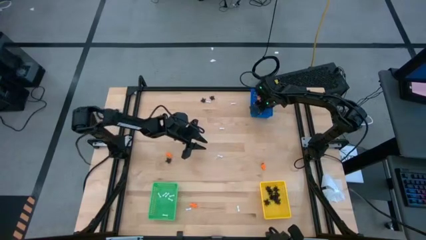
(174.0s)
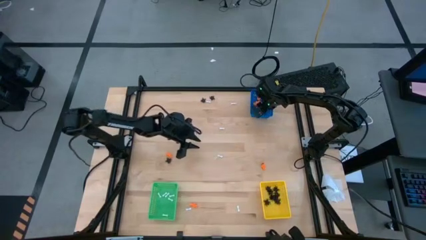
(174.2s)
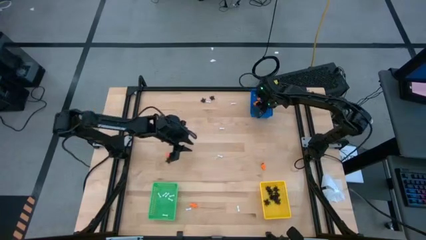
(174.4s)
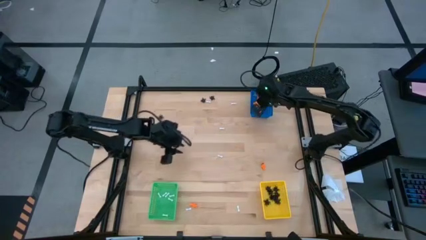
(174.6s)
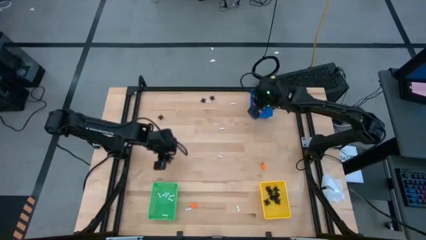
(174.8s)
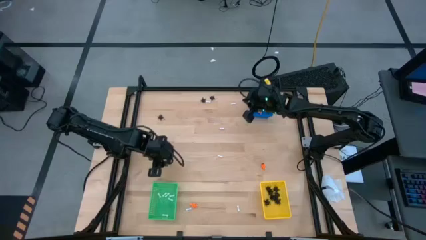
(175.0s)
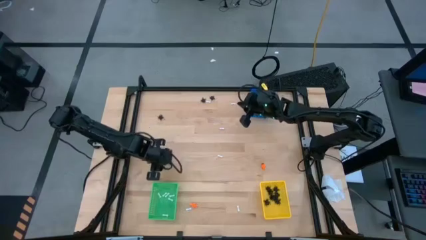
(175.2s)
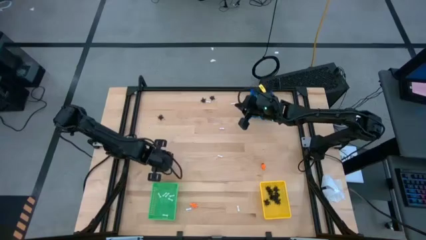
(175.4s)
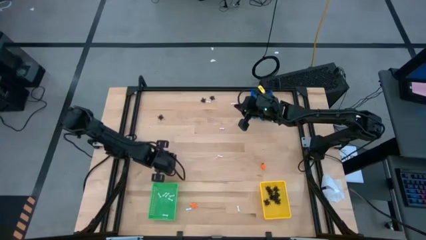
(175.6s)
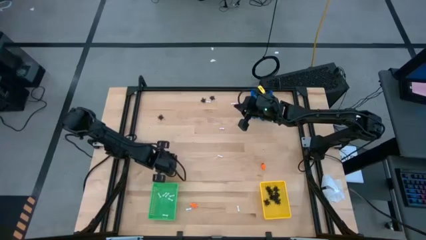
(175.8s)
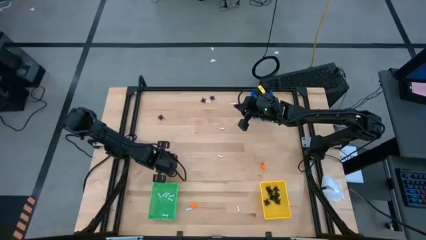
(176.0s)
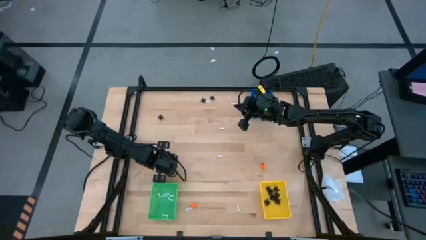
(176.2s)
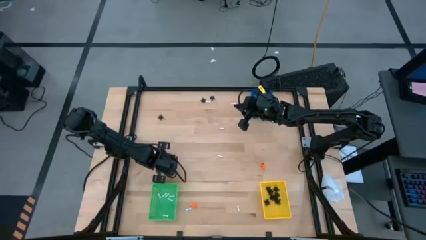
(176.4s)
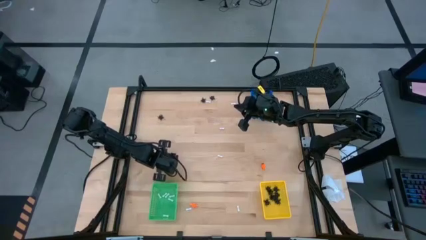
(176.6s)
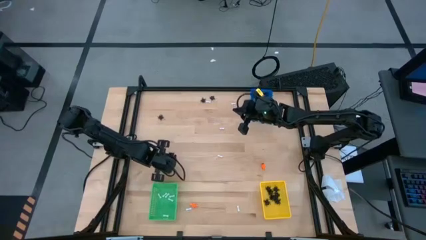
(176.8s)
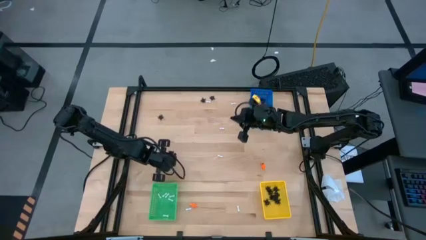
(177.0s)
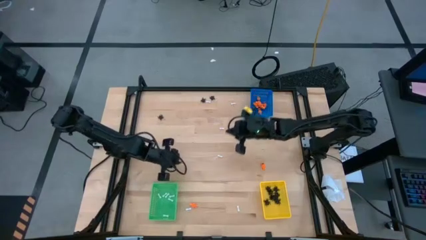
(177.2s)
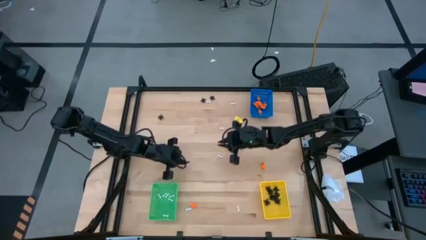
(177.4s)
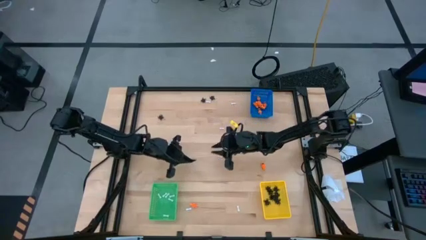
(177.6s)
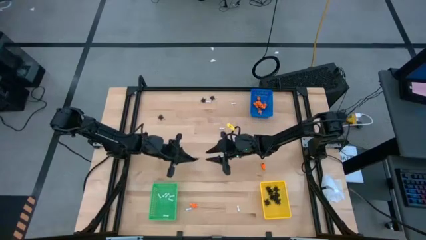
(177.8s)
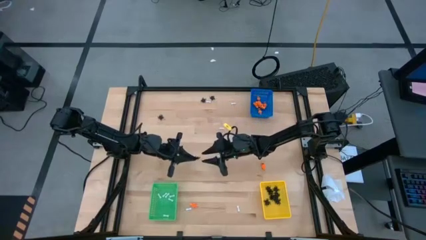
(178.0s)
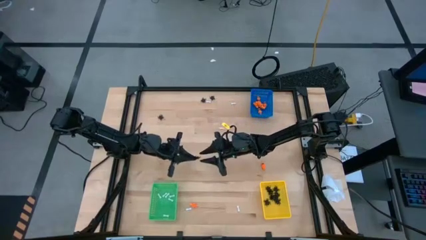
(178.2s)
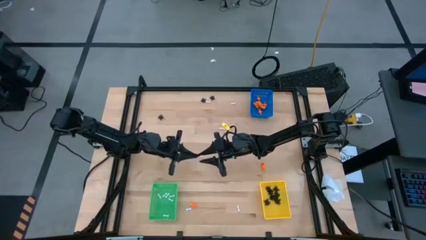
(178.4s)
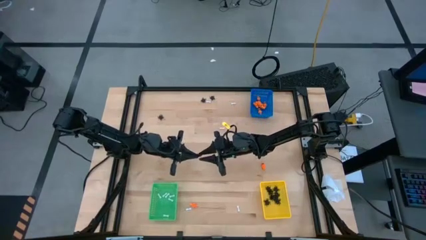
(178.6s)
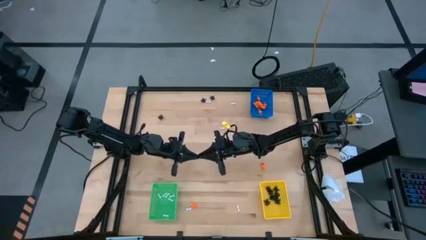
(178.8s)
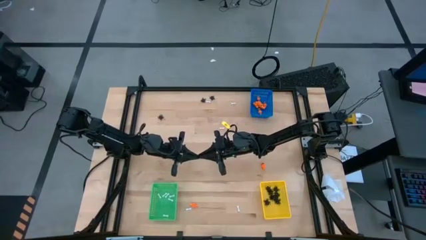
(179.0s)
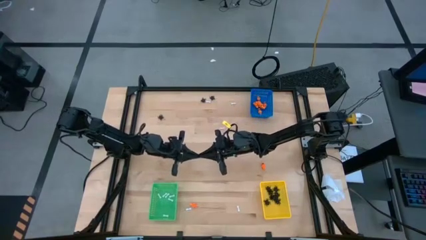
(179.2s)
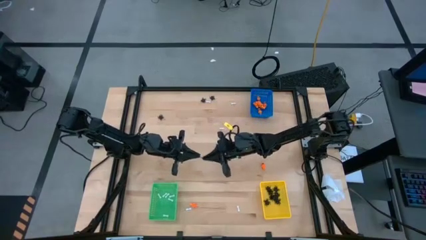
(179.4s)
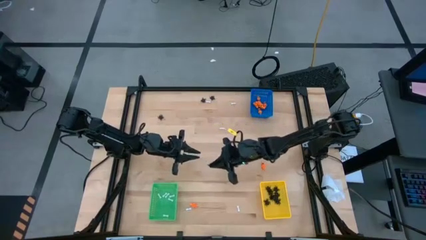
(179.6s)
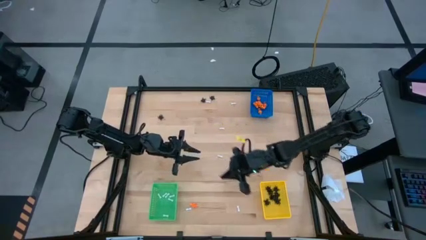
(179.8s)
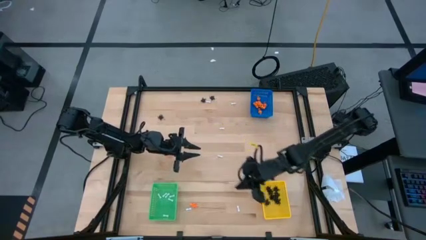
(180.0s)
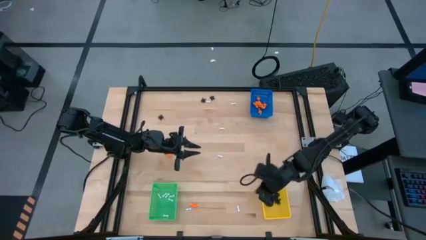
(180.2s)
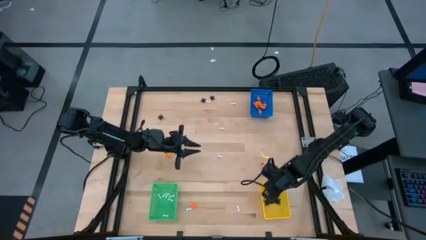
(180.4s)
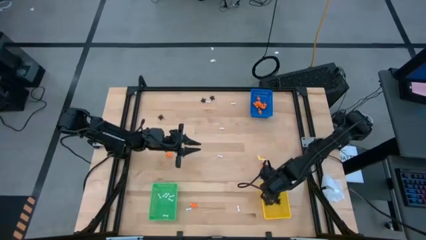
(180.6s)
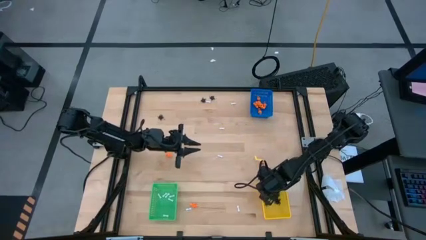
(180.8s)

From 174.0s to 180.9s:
Task: Sort Halloween decoration
Put the black spider toy into the yellow bin

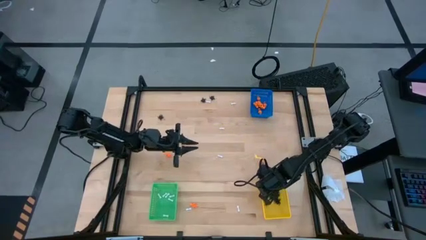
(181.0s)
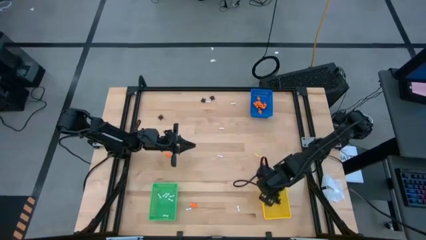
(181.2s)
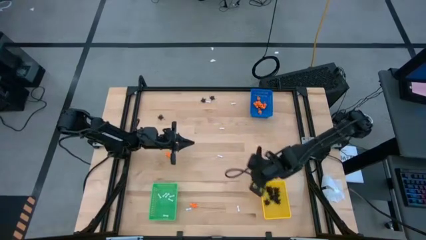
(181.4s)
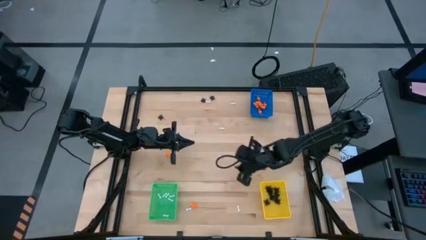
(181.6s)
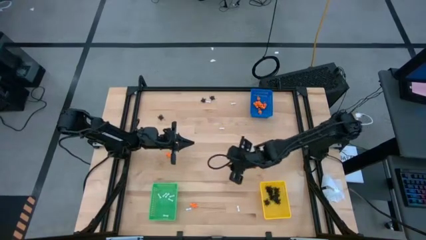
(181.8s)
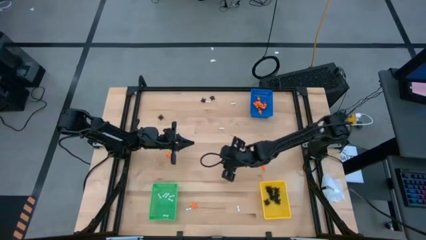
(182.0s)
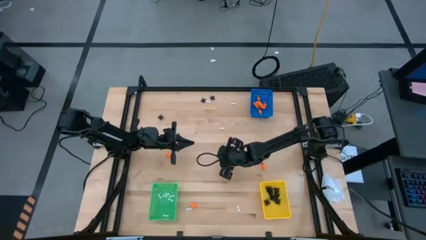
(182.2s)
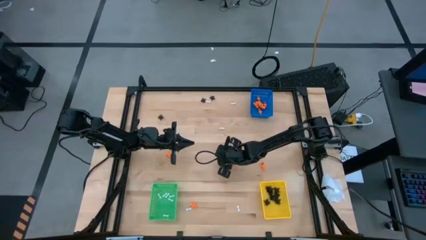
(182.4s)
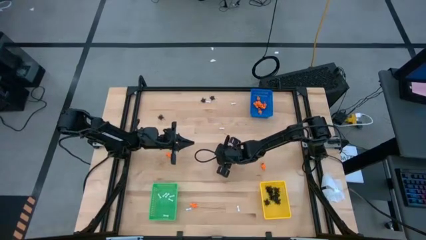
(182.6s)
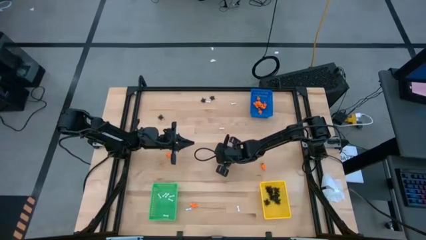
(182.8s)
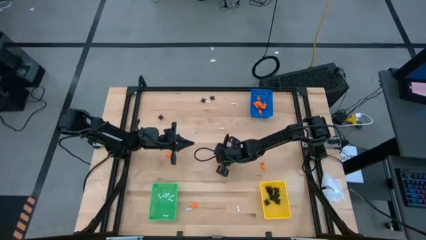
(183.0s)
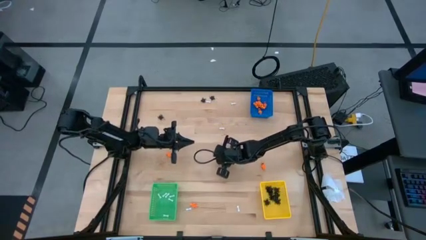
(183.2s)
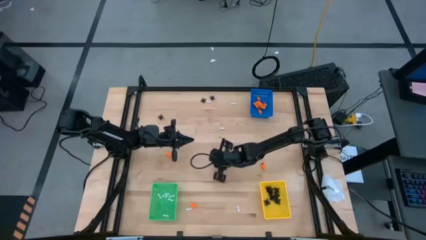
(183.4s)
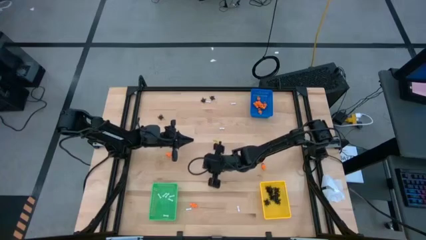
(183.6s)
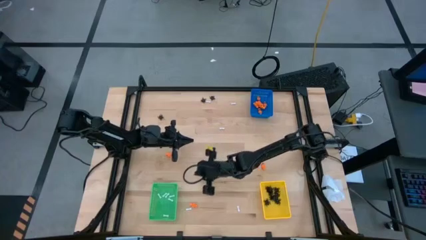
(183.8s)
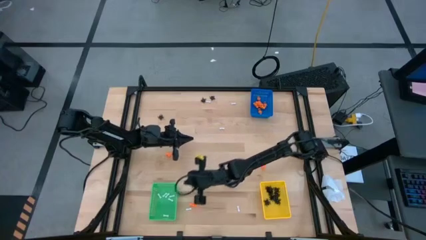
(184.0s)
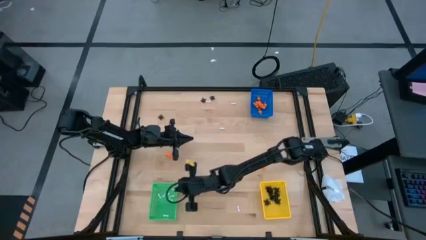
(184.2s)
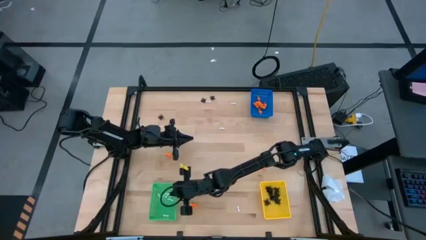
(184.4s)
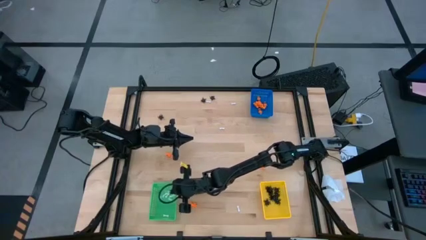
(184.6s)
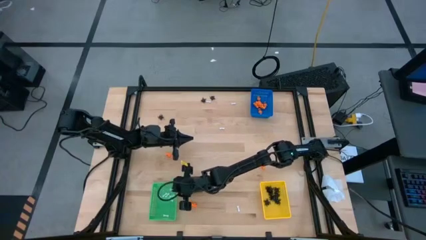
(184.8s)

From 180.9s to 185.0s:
Put the white bone toy into the green bin

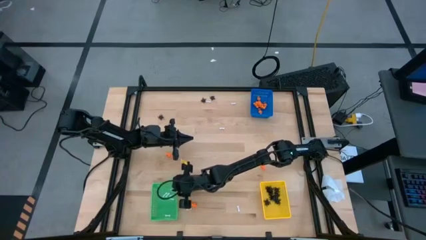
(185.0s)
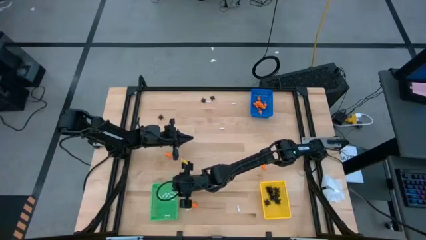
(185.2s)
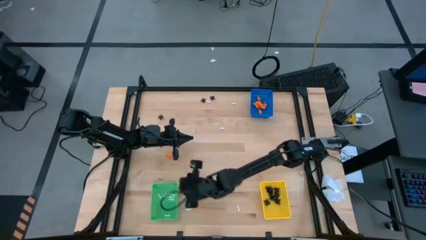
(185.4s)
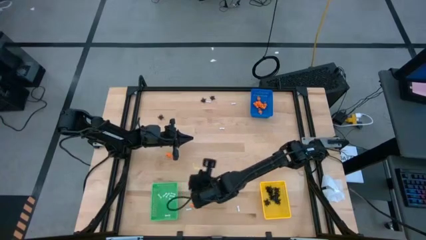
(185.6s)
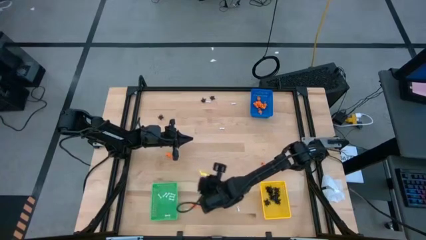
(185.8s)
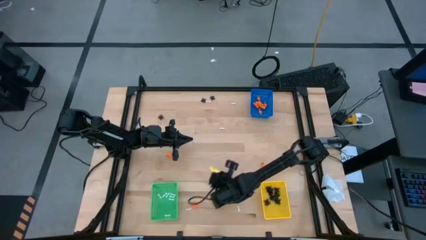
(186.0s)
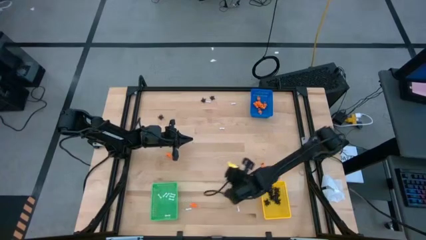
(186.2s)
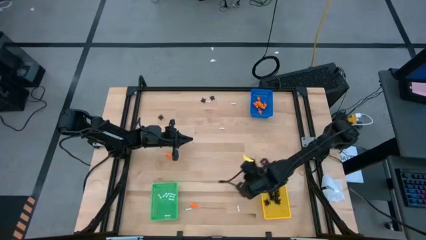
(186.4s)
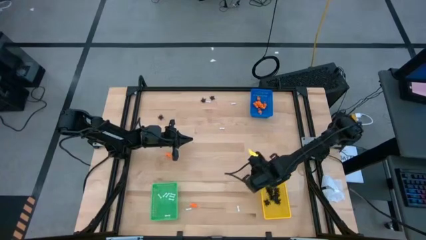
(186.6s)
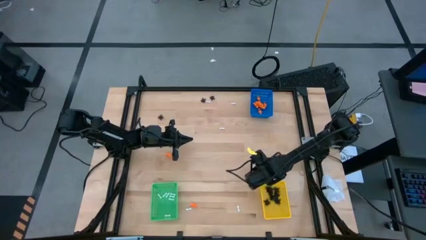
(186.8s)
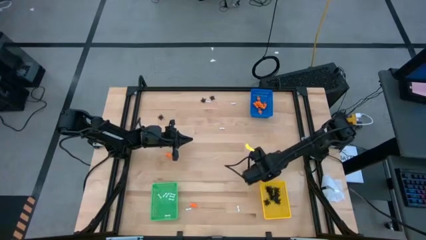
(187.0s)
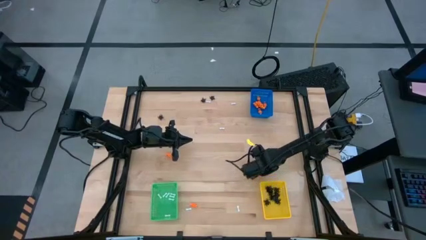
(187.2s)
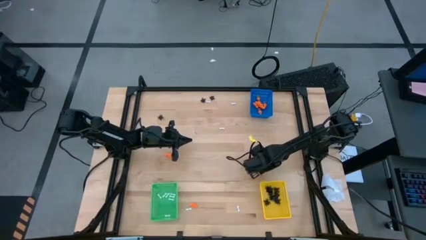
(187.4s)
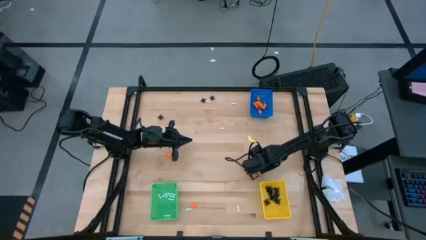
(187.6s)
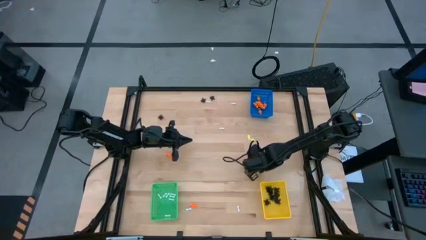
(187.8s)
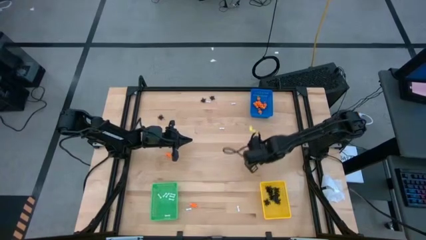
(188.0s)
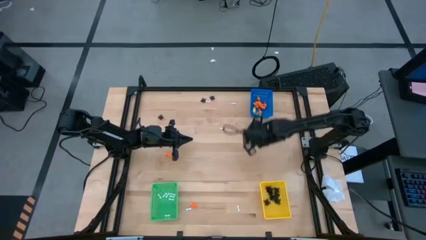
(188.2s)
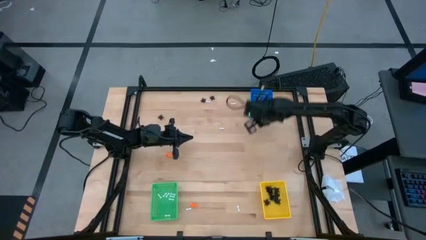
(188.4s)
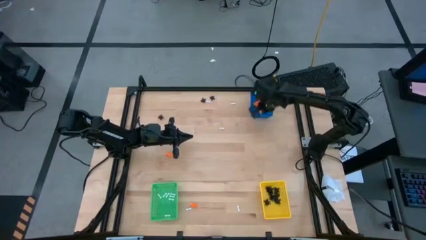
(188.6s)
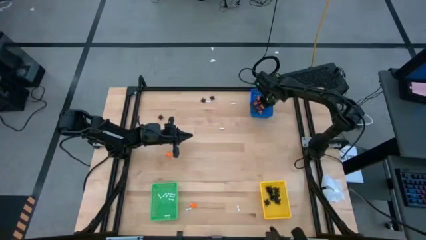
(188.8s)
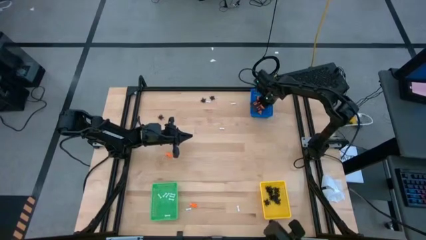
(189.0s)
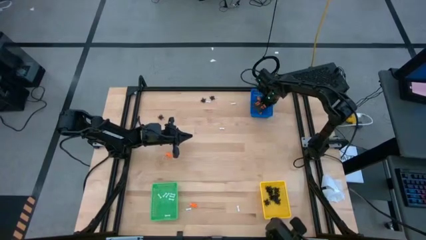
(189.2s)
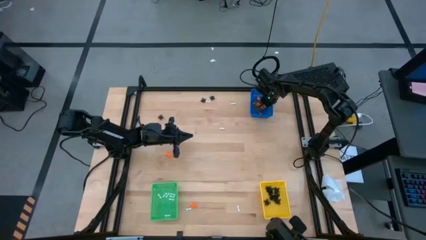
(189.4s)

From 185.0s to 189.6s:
Put the orange toy skeleton into the blue bin

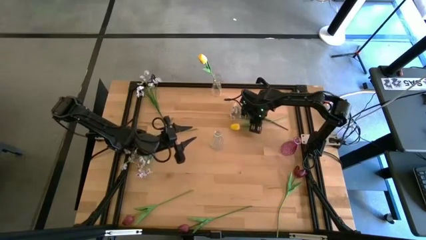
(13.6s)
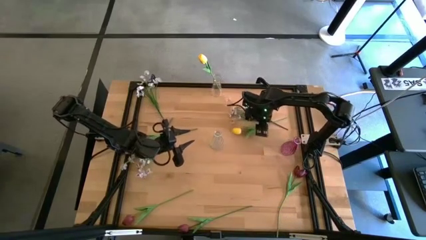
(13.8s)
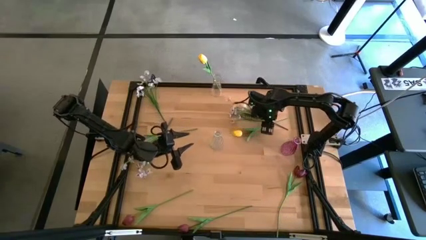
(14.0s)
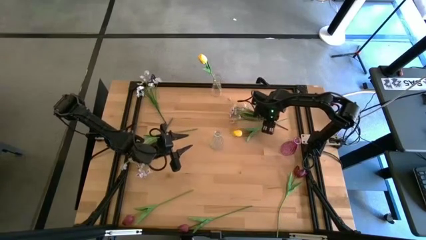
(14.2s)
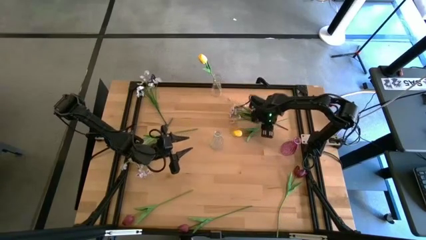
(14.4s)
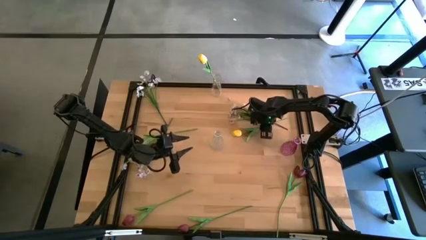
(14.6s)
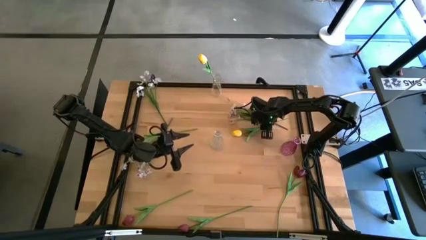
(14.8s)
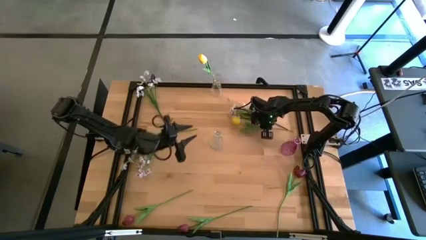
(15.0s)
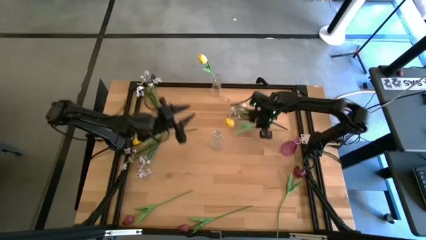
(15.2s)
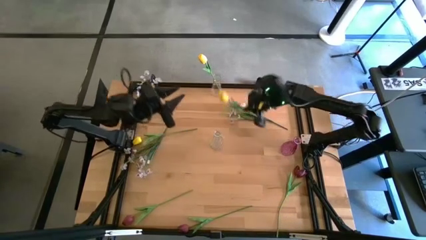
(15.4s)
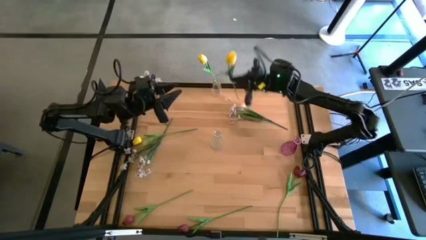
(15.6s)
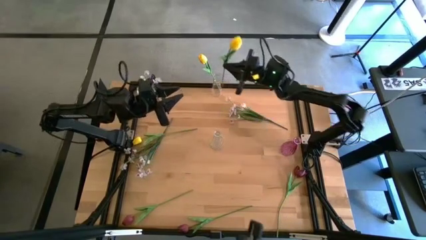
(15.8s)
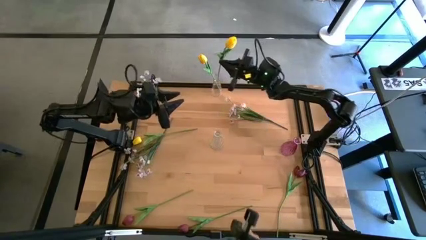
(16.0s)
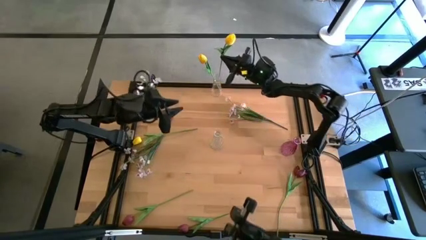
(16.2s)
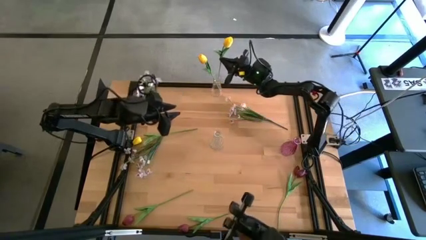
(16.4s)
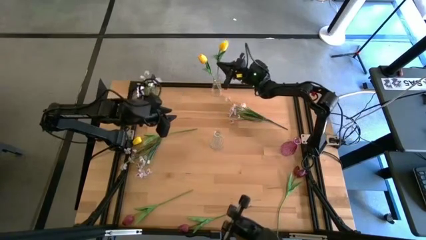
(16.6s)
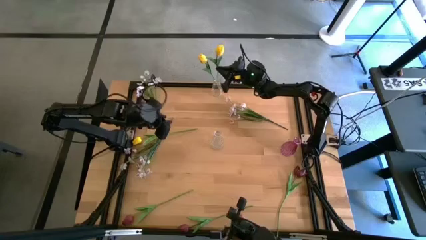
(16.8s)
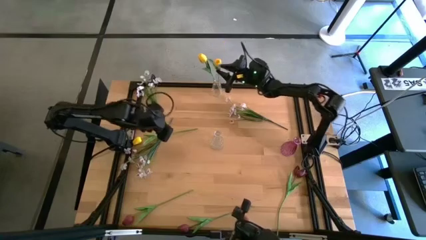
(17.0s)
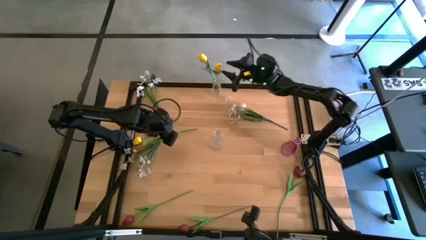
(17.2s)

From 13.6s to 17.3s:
Task: Sort flowers into vase by color
Put the top yellow flower into the top vase
